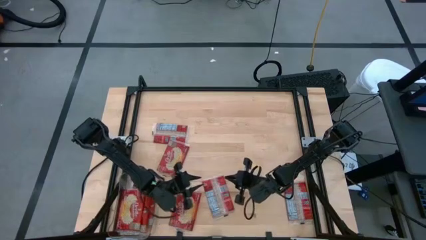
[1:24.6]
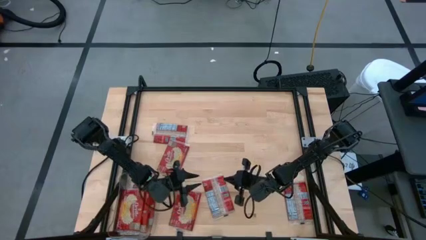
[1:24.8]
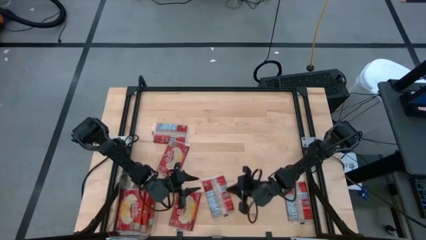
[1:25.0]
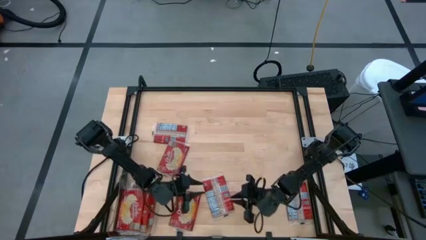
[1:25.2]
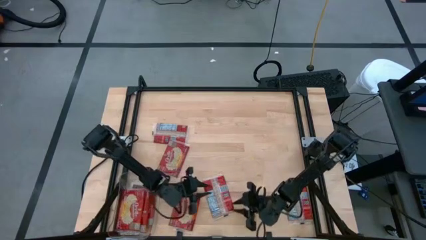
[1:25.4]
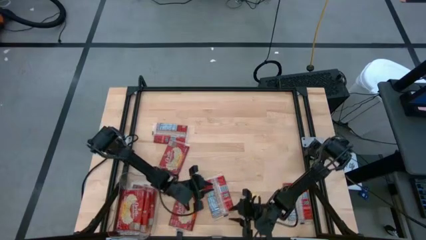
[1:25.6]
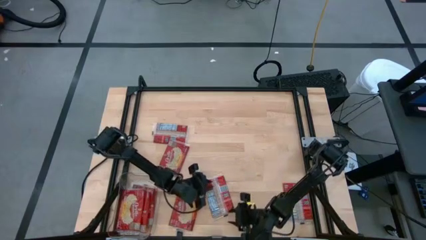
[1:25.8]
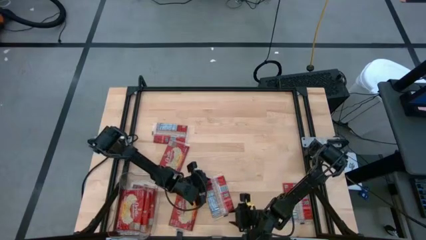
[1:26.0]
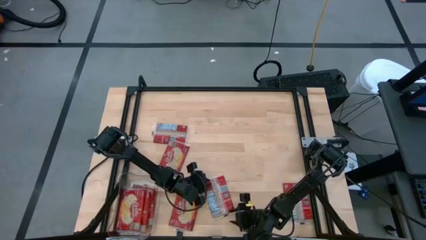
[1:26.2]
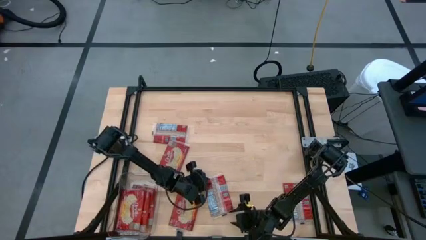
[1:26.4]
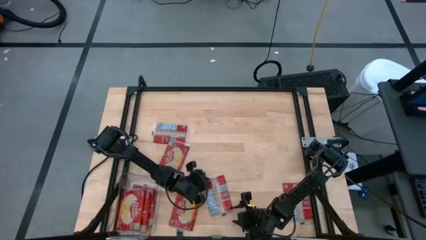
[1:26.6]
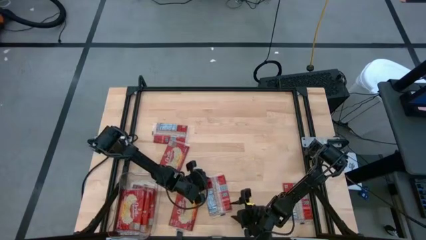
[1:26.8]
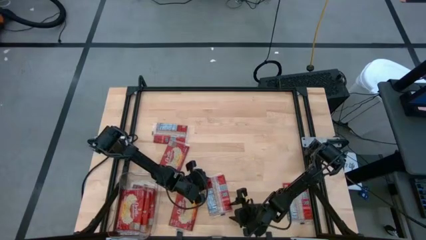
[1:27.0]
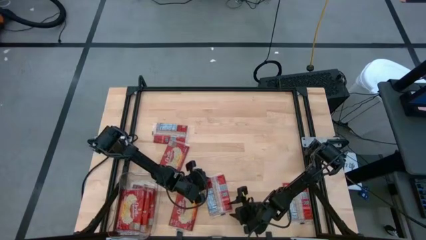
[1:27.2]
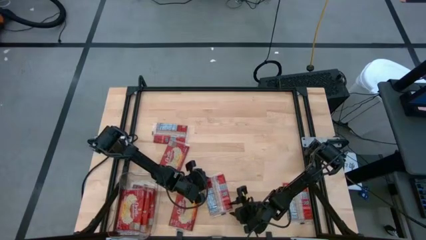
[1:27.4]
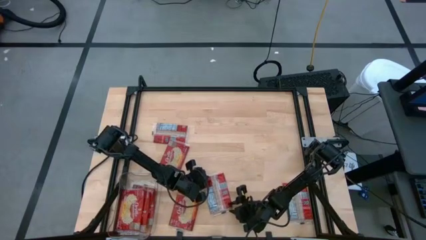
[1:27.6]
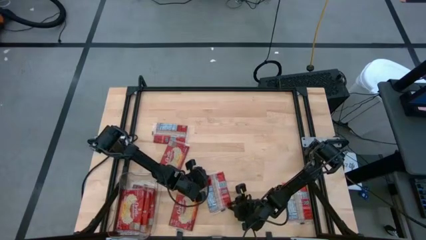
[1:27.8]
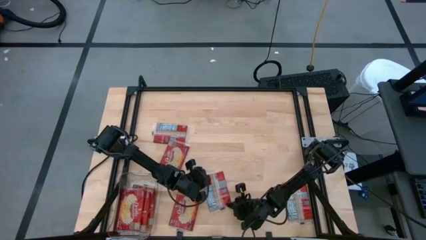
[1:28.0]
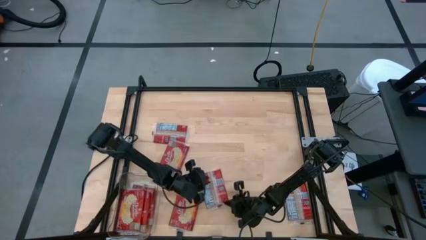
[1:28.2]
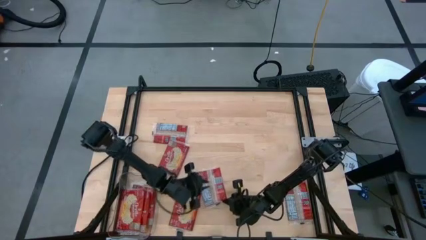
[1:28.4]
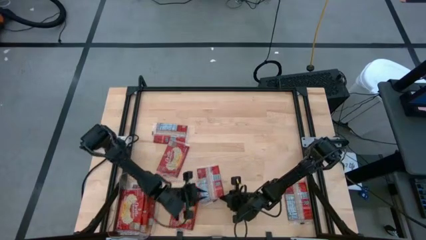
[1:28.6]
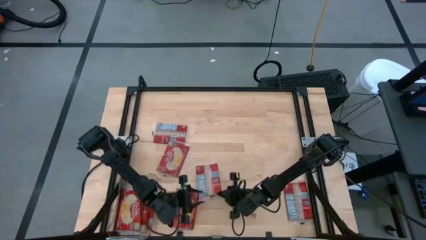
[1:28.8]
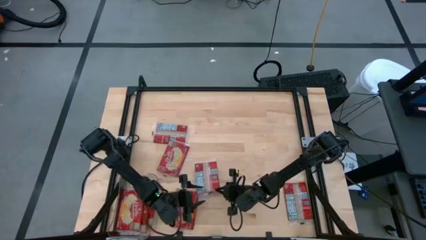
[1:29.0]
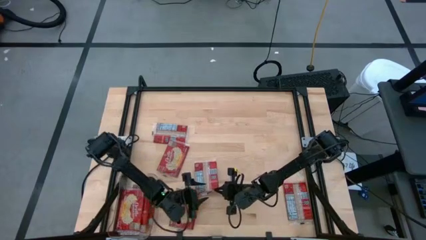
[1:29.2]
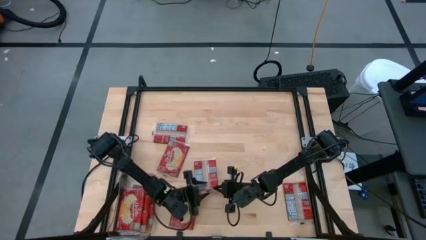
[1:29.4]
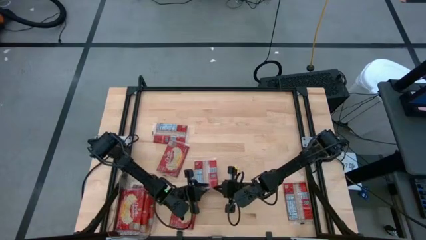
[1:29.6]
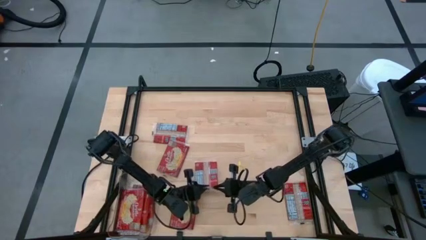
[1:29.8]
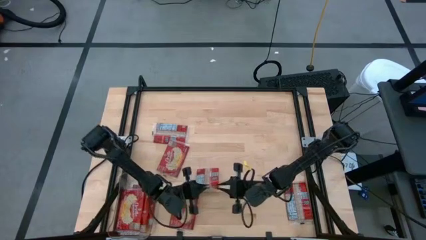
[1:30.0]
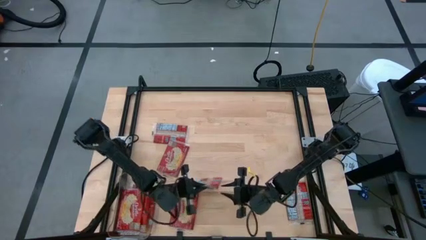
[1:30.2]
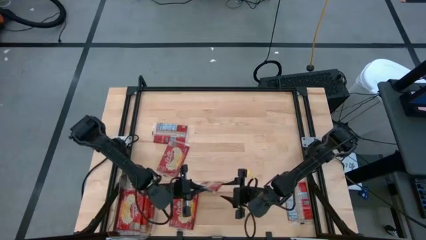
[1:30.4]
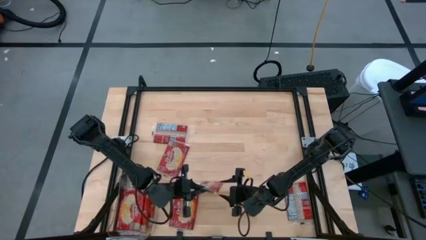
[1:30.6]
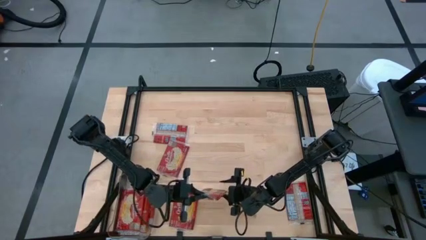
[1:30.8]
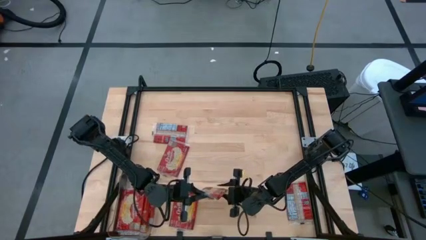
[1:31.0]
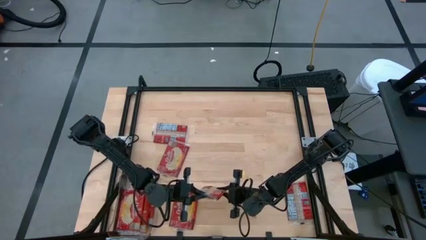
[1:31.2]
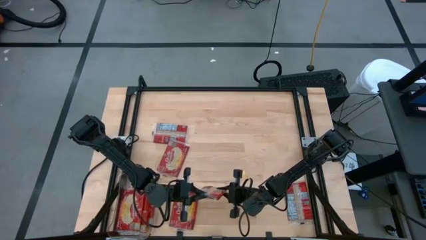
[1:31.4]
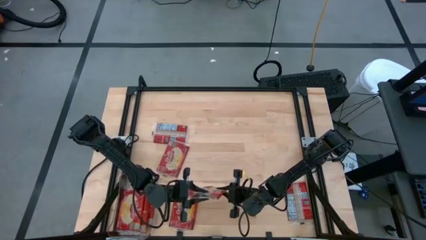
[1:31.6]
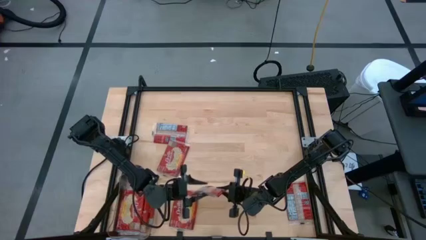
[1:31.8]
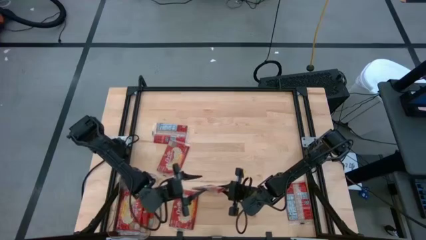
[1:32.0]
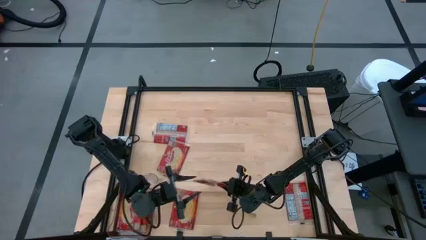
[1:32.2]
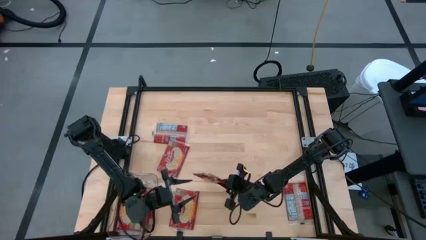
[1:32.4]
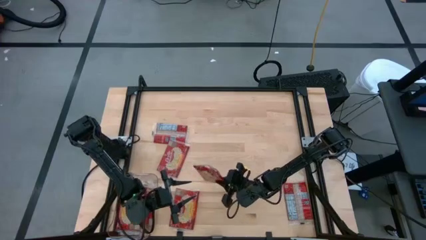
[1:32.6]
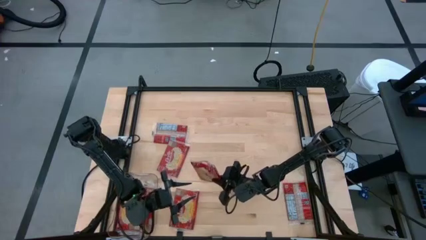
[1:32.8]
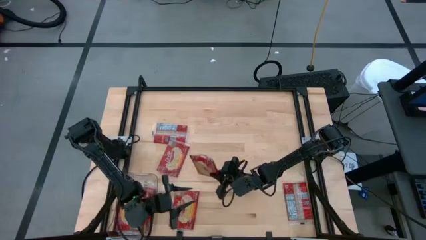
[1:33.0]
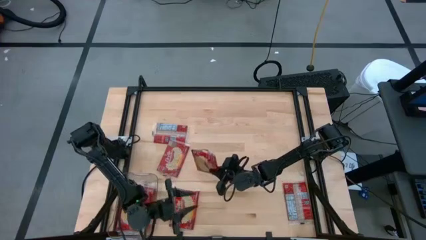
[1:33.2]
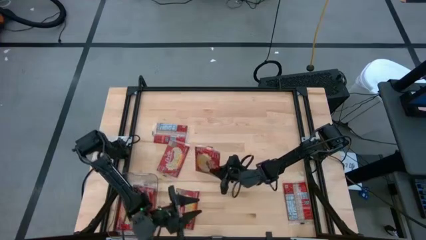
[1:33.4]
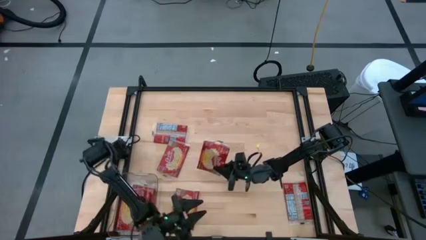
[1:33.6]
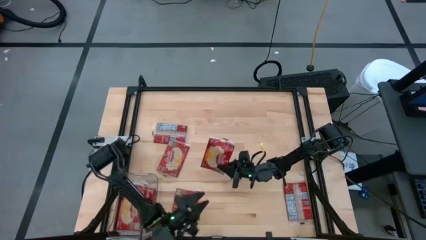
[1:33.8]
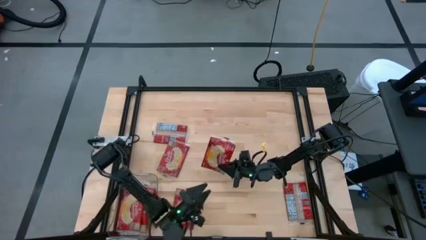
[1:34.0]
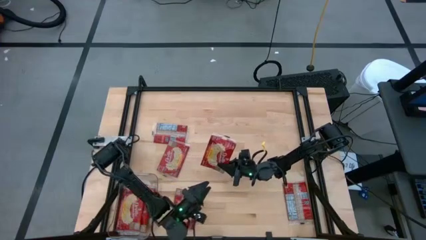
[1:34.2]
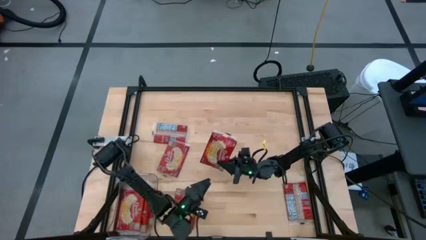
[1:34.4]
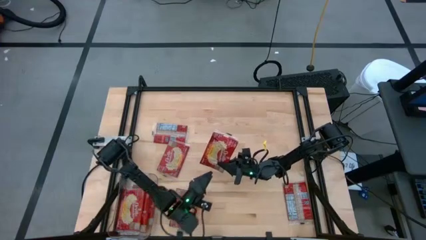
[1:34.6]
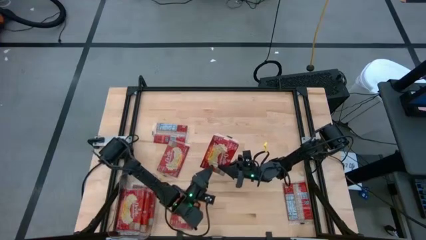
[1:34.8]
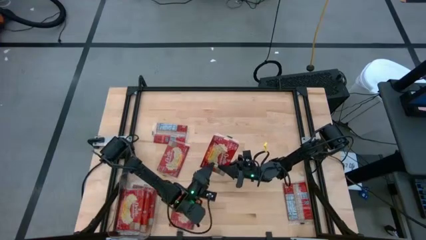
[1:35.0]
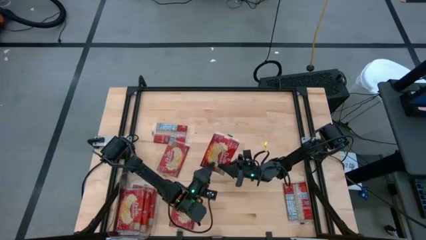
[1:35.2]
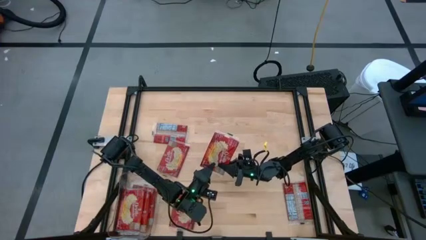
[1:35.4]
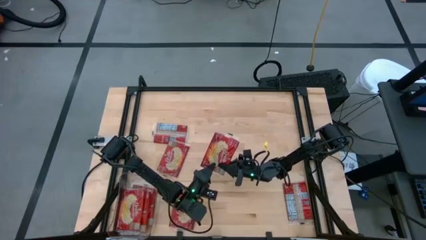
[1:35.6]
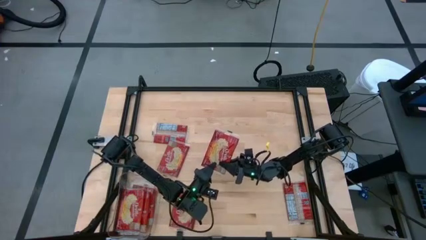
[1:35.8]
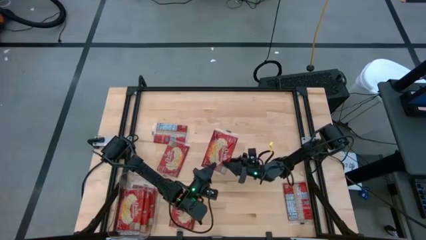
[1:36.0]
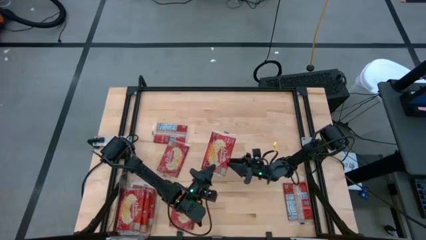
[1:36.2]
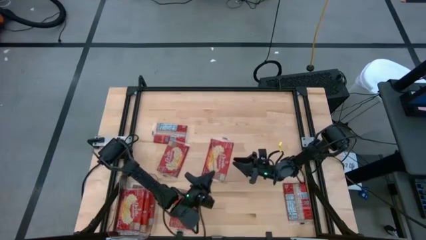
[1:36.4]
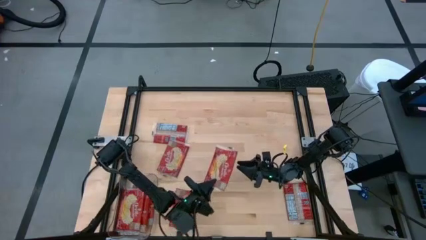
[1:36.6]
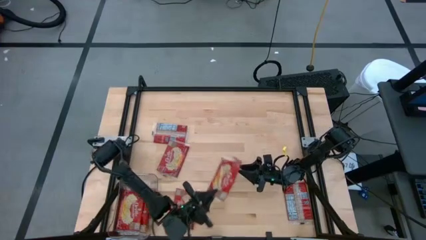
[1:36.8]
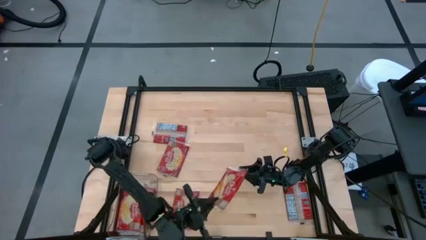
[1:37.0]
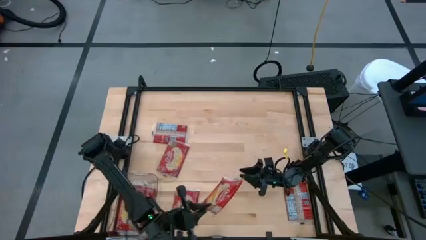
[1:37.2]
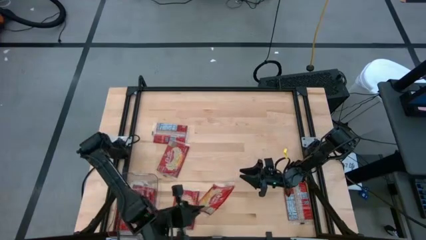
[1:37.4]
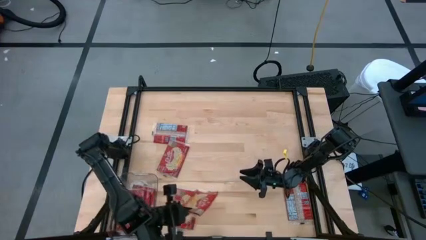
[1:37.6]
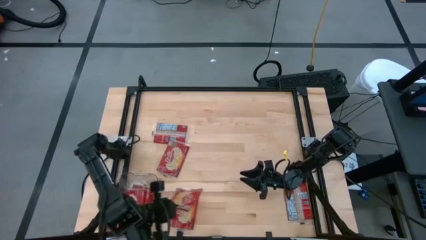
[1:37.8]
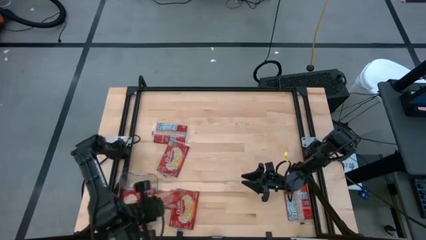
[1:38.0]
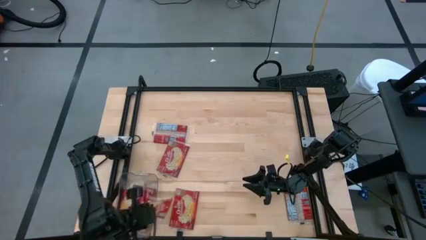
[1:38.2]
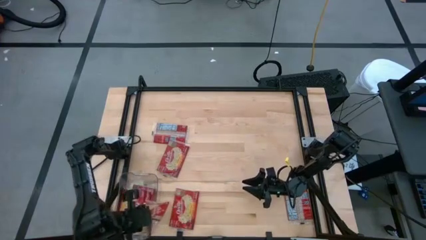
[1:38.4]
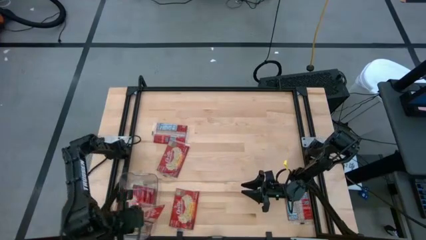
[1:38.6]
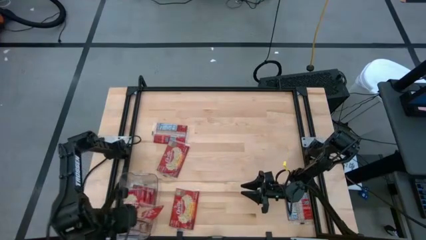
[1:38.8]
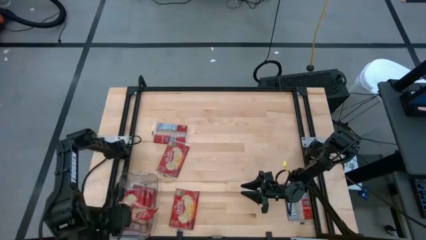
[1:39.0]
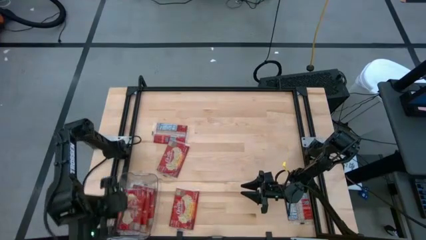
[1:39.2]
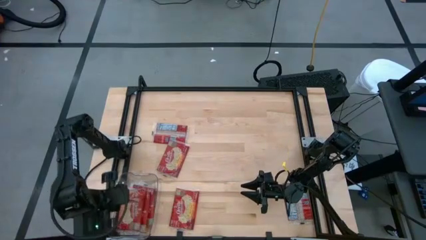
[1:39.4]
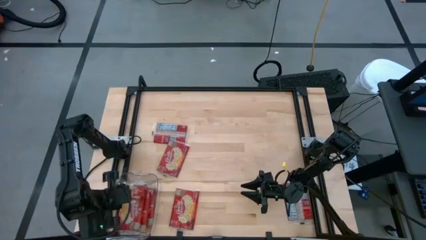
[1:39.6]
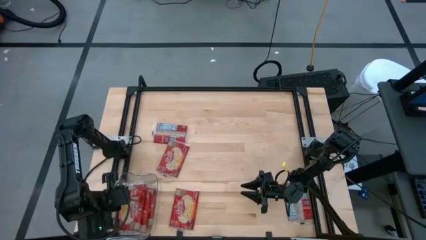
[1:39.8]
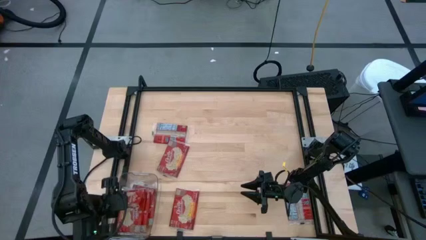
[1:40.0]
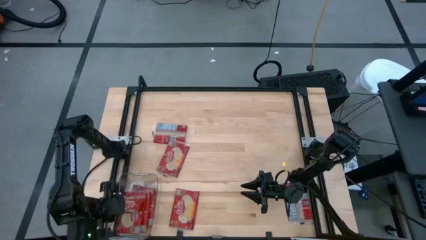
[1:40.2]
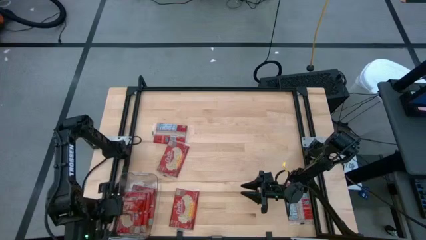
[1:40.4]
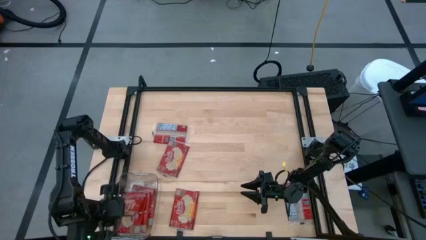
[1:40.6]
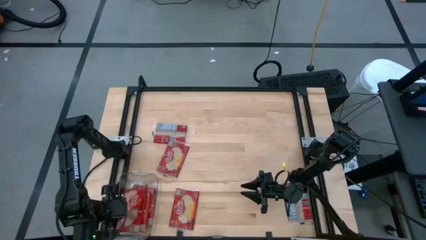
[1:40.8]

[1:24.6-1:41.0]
Task: Sort popcorn bags into baskets
Put the popcorn bag into the transparent bin
